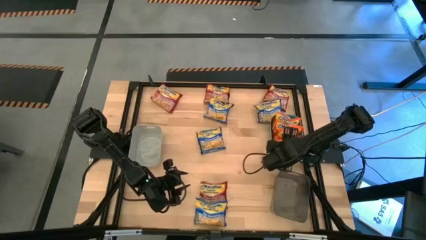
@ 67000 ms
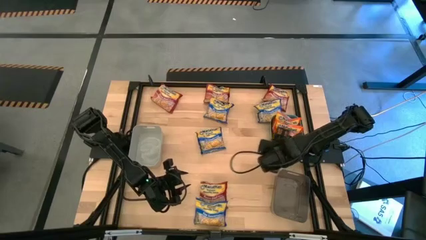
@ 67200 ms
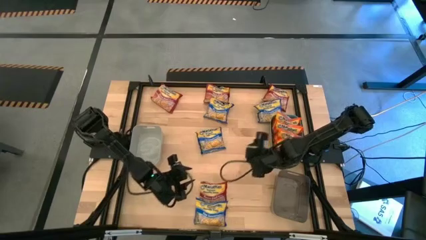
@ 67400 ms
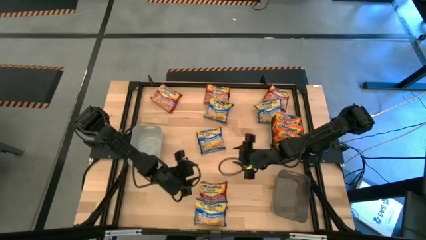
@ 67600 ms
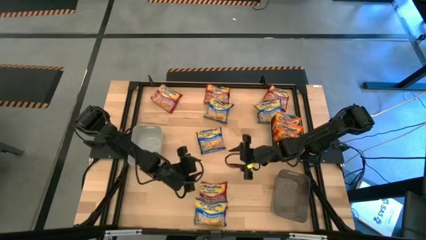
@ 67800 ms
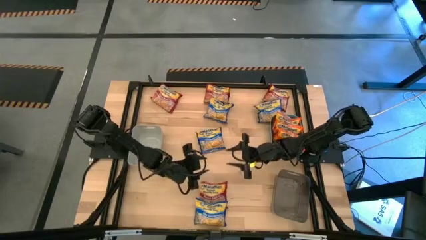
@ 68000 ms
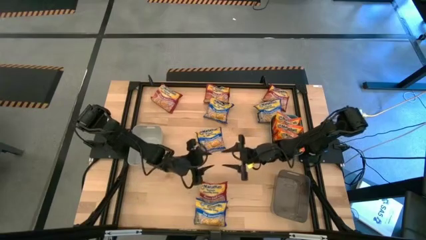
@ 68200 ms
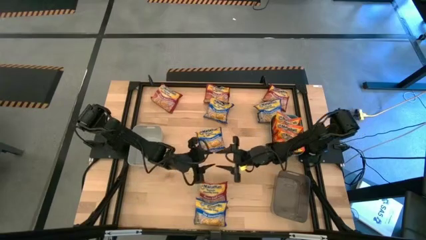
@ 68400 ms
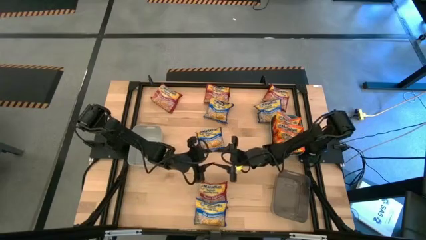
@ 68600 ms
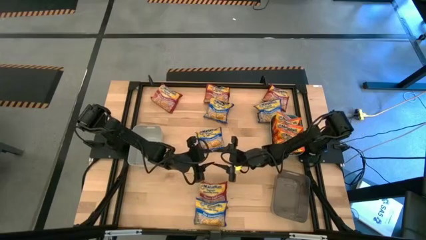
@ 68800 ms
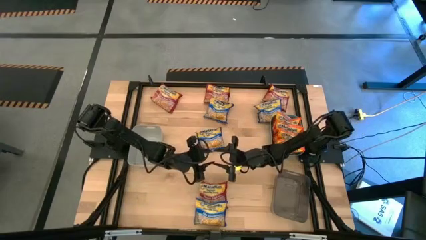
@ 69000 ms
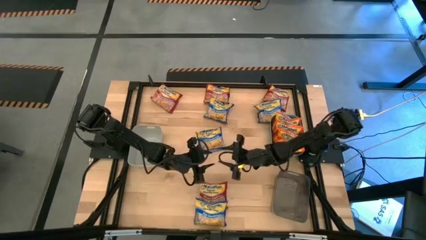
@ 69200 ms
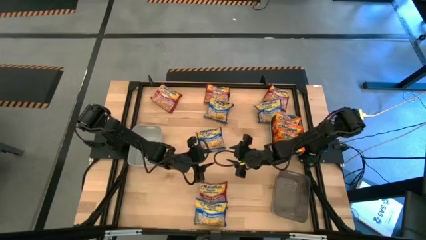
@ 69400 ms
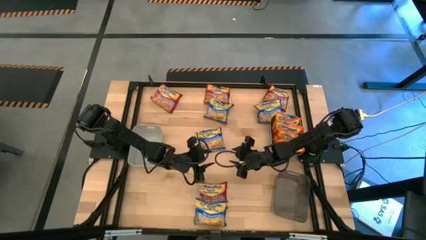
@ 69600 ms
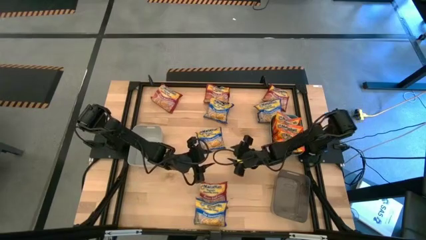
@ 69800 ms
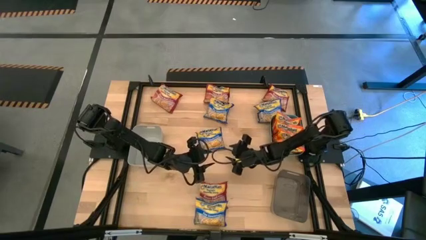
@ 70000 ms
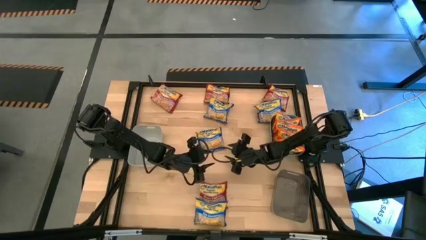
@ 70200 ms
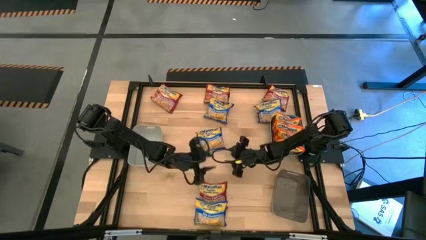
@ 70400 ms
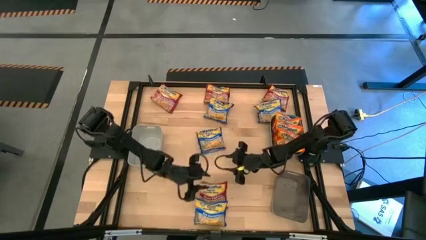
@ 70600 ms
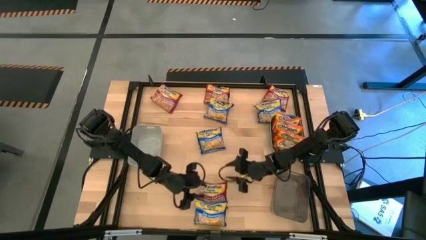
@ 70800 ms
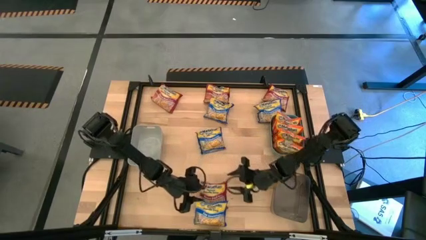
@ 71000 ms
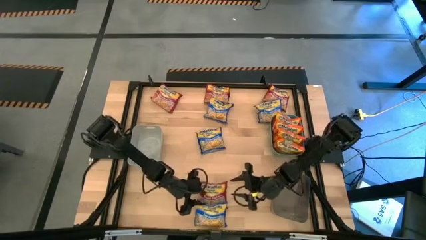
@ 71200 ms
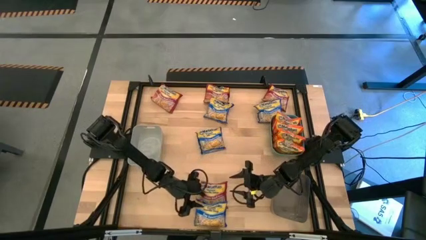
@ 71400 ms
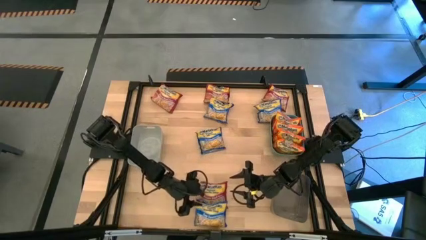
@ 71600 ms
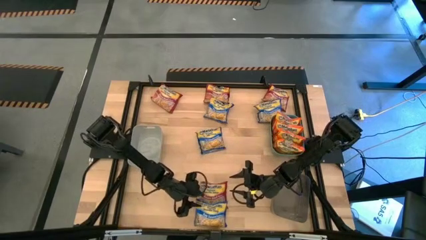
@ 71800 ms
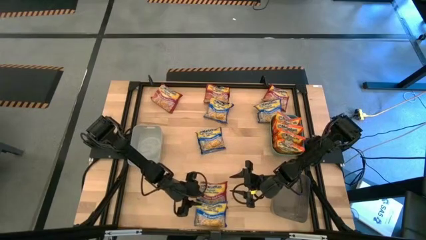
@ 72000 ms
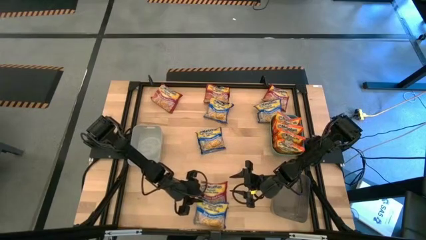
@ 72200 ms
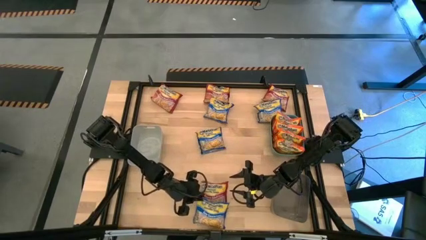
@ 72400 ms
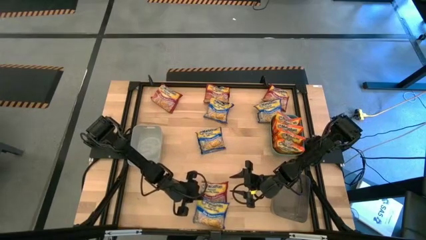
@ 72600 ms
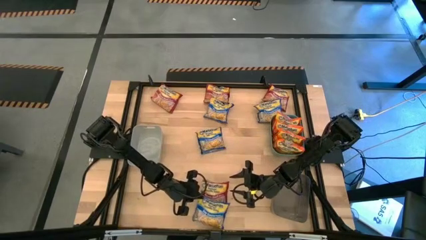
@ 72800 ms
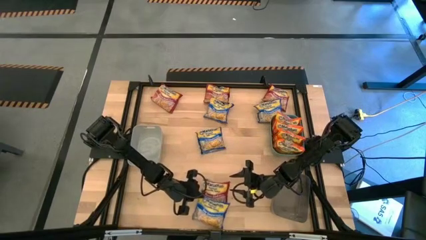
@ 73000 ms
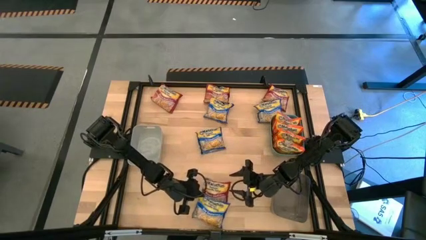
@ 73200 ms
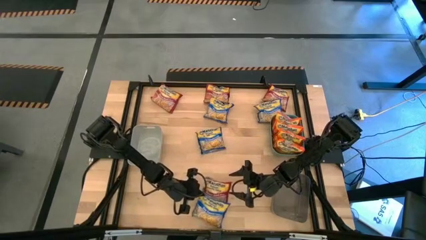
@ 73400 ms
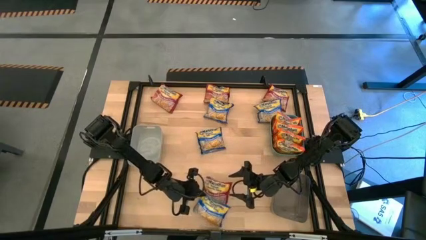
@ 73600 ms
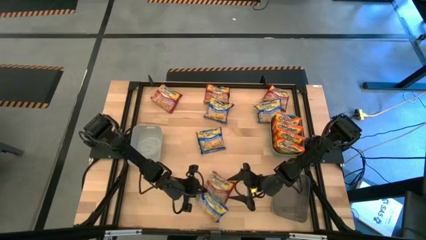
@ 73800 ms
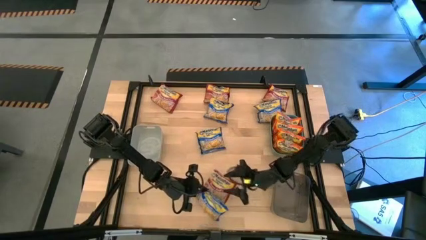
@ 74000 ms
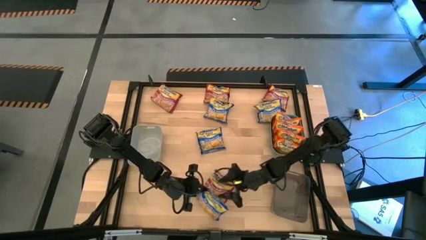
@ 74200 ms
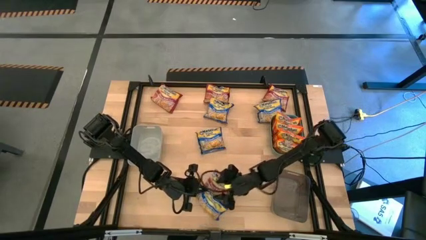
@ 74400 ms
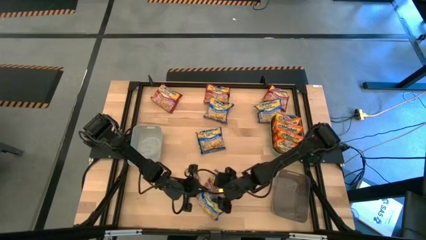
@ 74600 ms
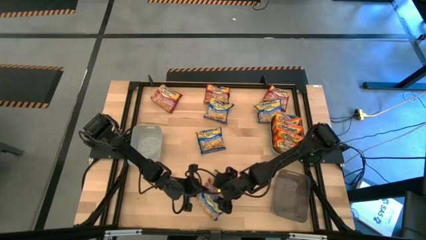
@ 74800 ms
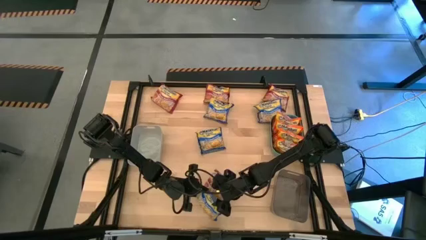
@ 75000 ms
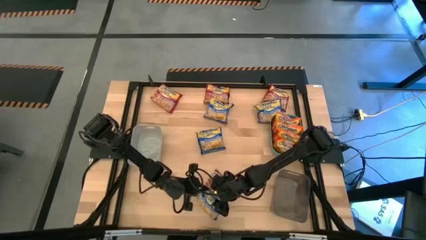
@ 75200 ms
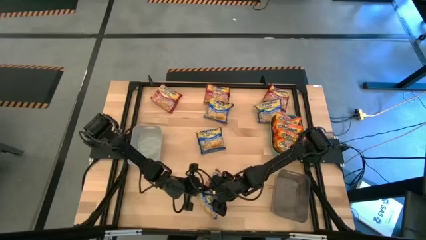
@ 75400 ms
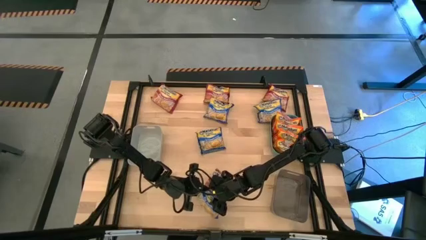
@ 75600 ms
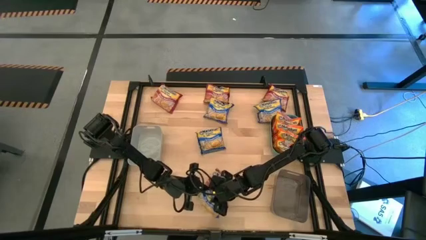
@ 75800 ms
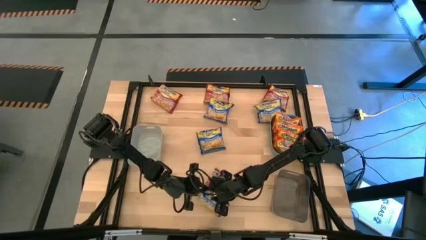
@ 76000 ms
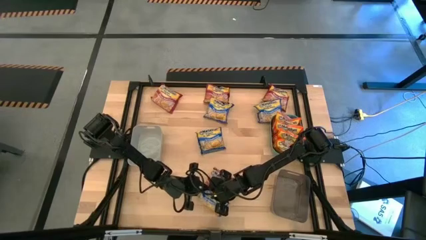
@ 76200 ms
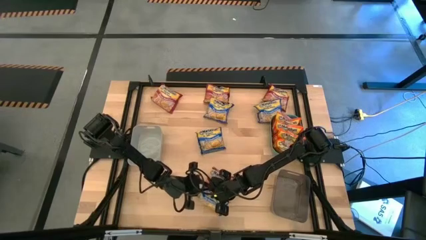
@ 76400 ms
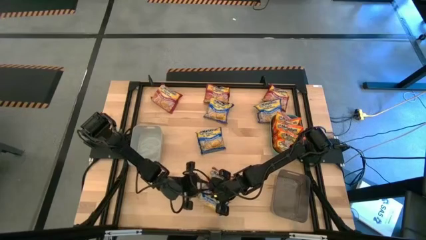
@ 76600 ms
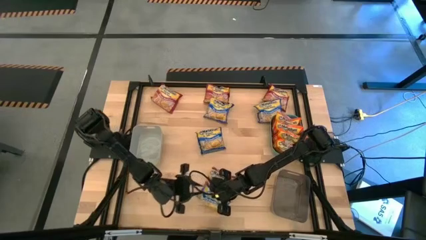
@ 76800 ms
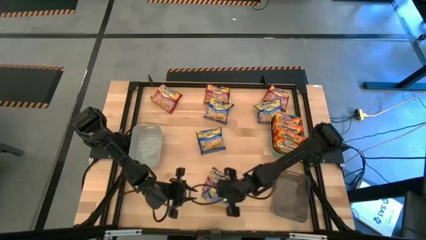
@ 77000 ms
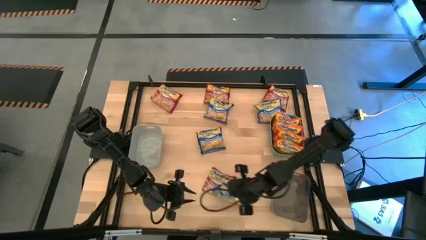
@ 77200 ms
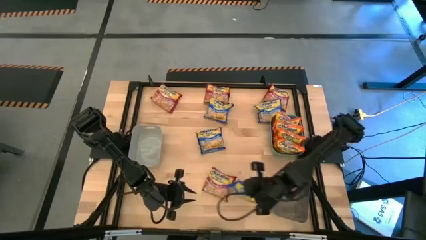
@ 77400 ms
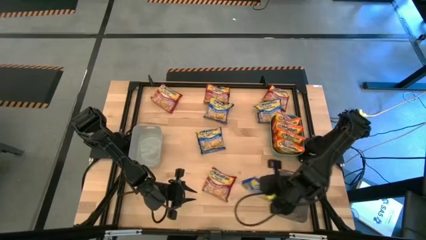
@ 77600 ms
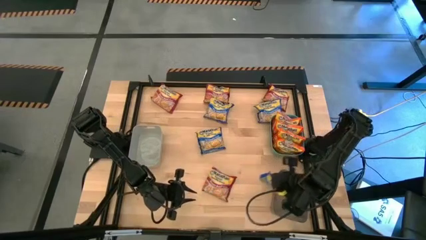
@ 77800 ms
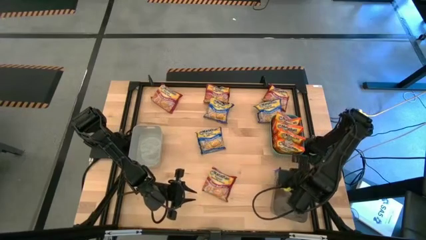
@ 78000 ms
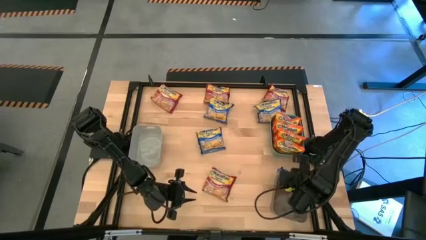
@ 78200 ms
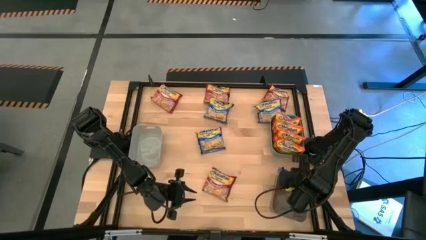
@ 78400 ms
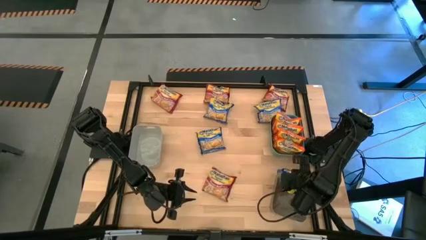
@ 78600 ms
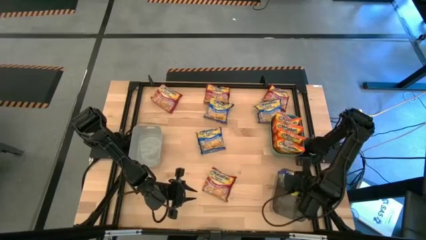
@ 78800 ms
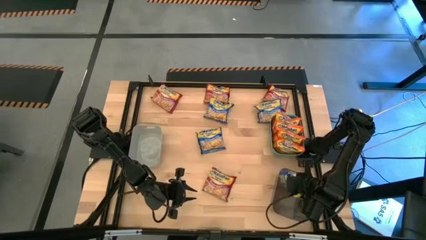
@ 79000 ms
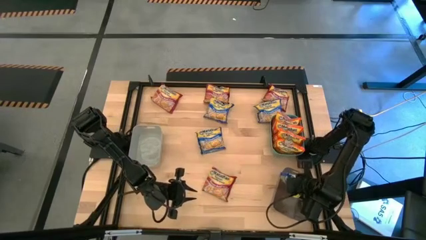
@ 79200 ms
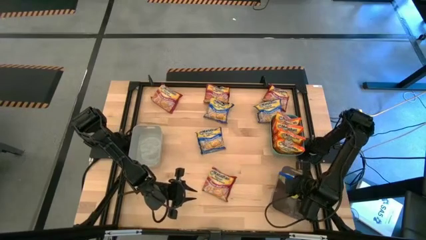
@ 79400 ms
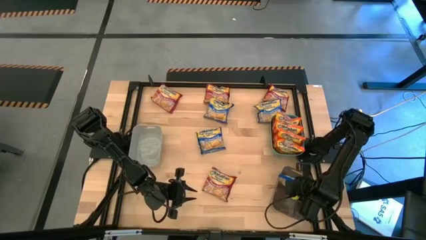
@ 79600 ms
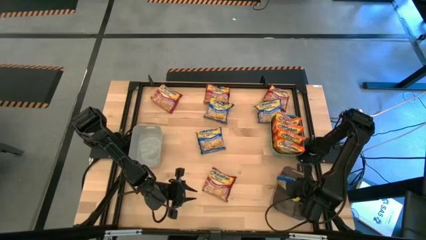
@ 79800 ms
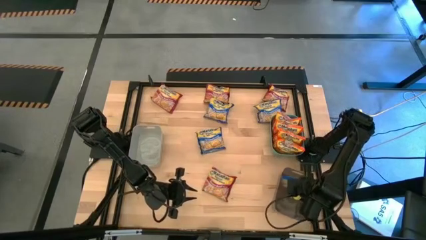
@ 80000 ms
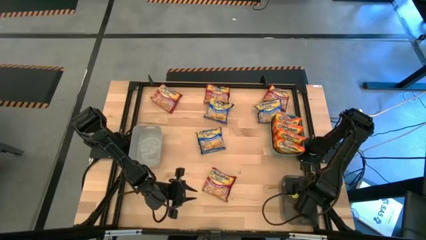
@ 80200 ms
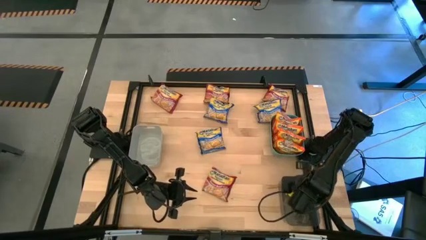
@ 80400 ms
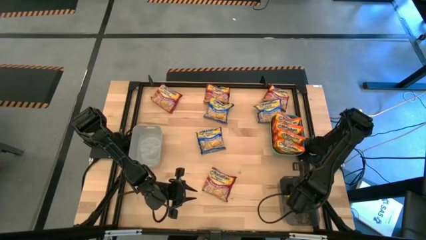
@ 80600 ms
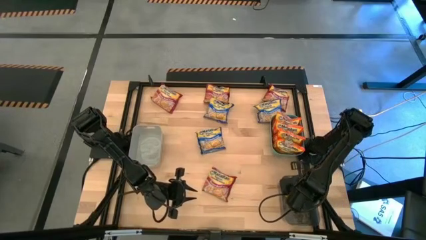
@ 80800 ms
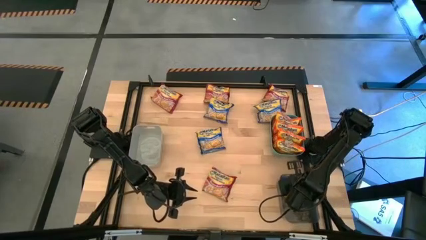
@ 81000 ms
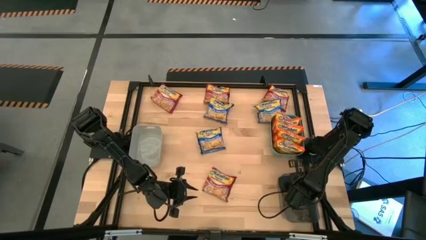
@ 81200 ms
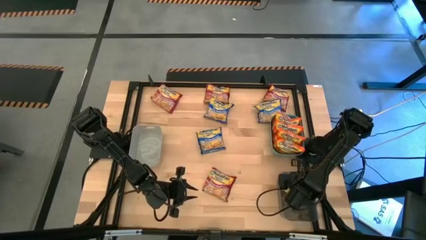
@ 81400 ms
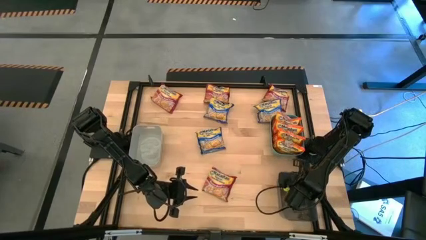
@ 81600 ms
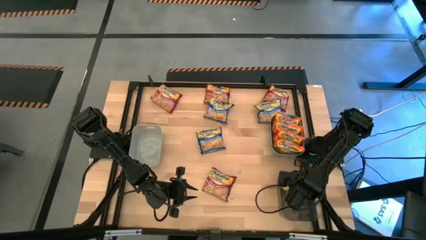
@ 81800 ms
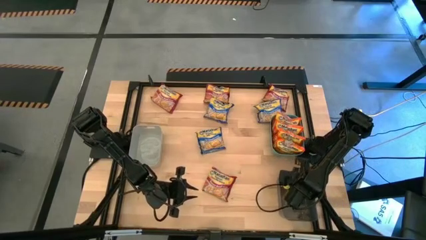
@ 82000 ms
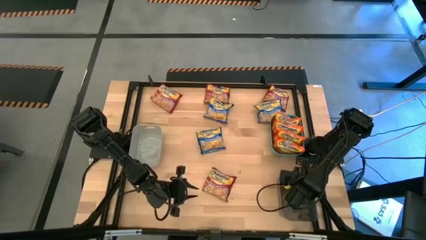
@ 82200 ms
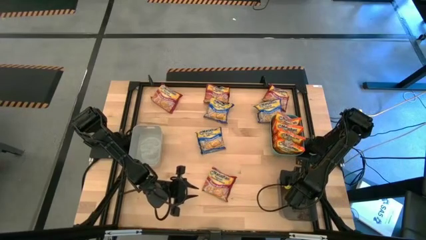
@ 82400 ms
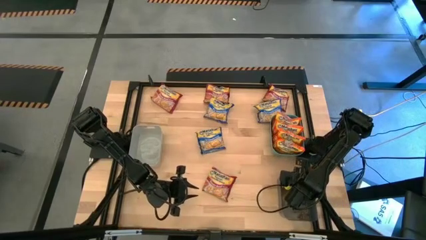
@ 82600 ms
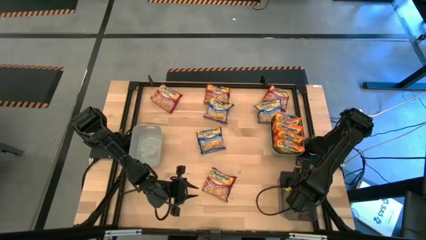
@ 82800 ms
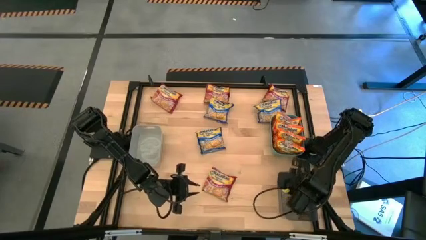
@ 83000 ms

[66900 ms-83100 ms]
Task: Sort Maruchan noodles
Put the blue noodle pack into the black bin
